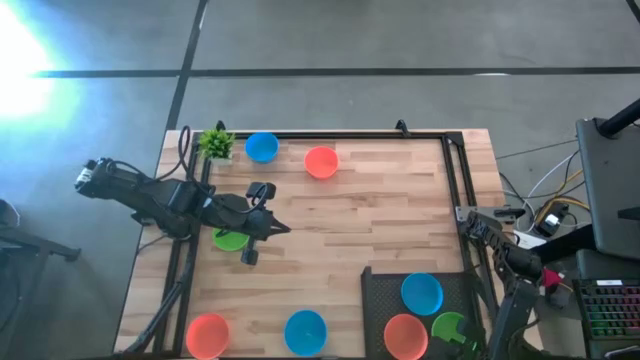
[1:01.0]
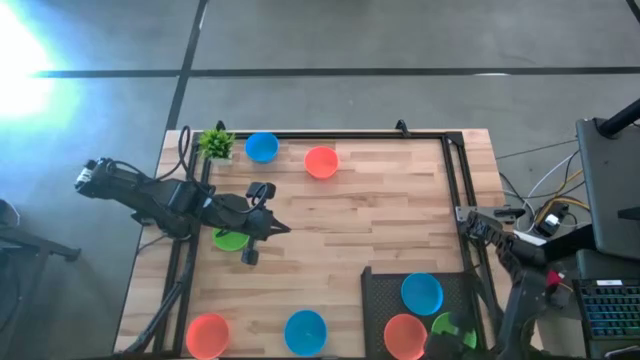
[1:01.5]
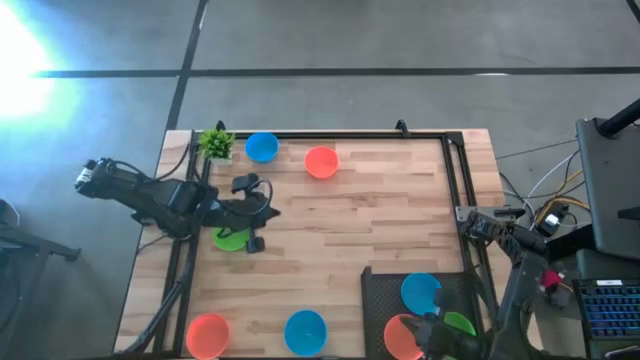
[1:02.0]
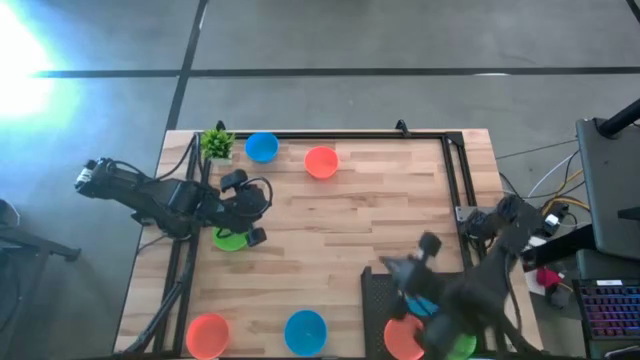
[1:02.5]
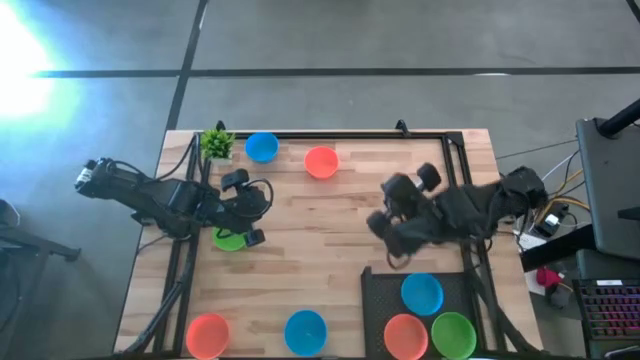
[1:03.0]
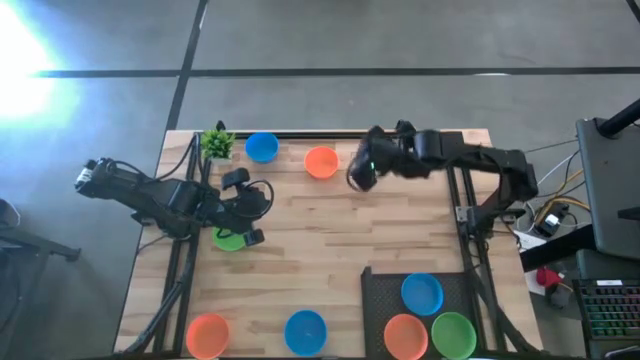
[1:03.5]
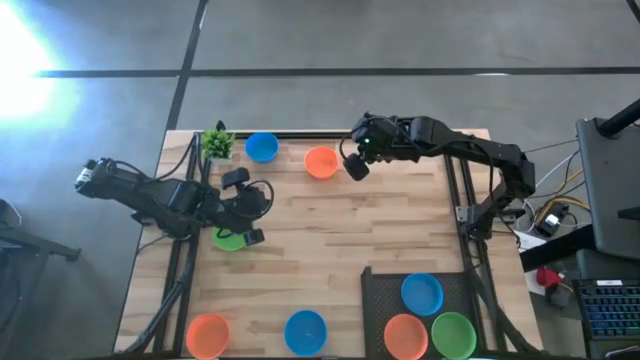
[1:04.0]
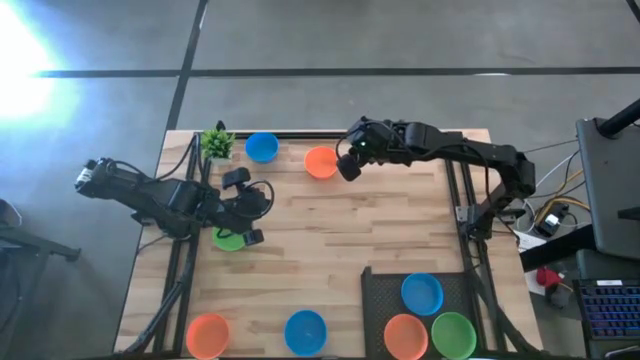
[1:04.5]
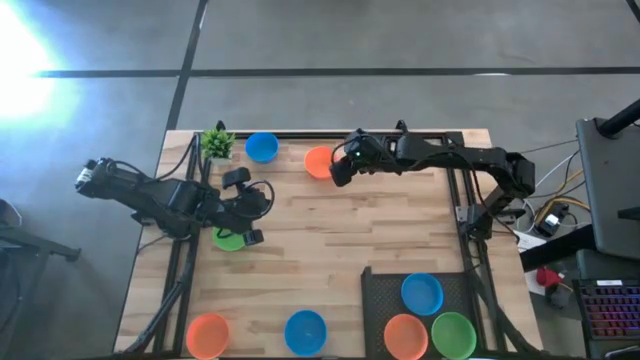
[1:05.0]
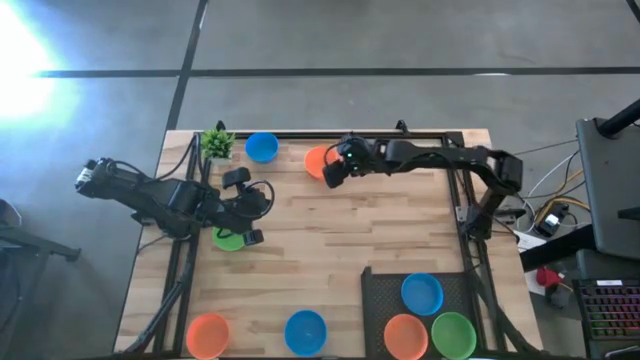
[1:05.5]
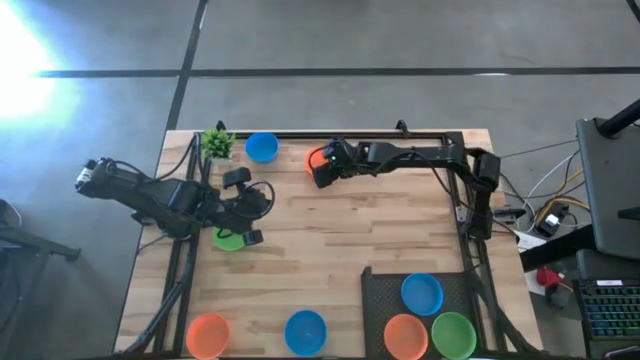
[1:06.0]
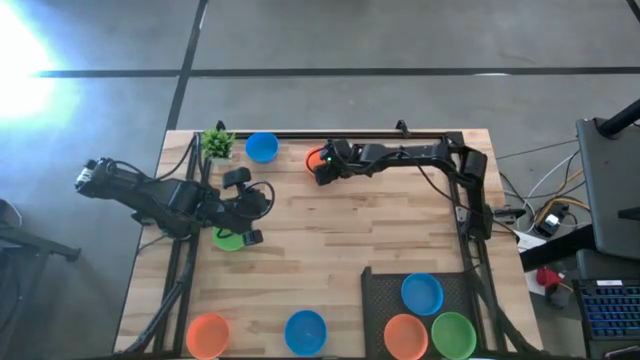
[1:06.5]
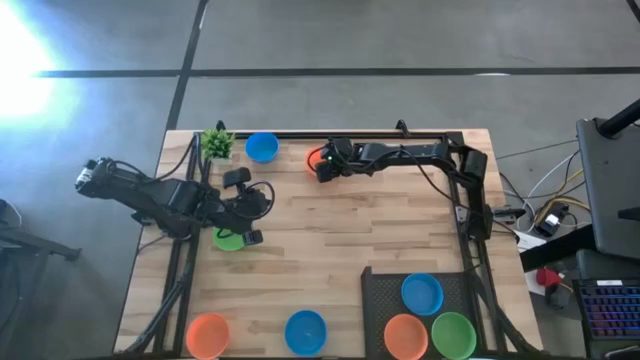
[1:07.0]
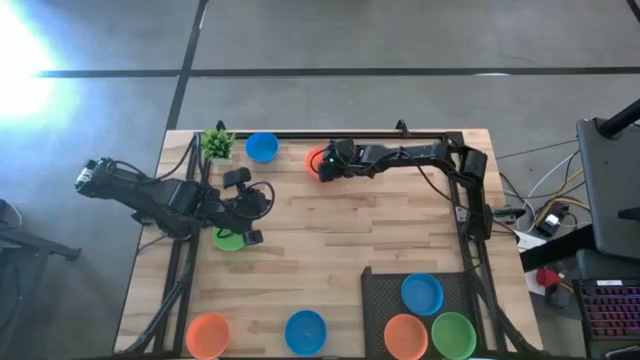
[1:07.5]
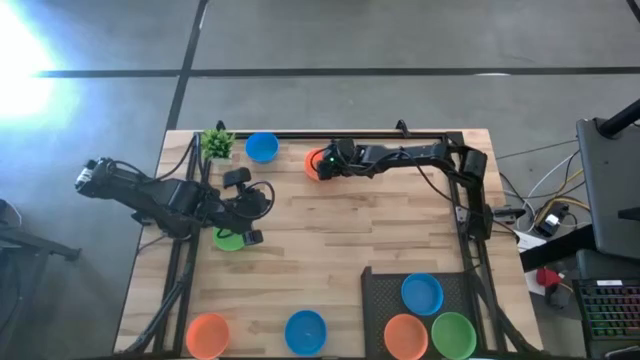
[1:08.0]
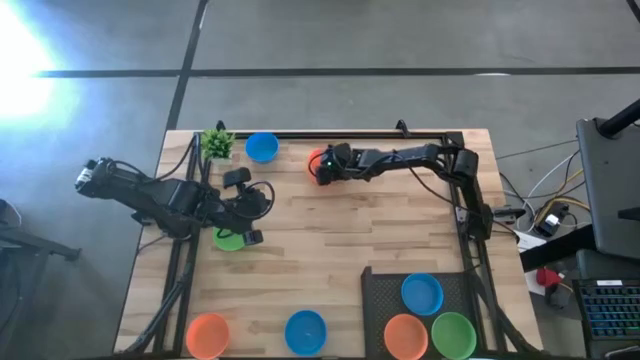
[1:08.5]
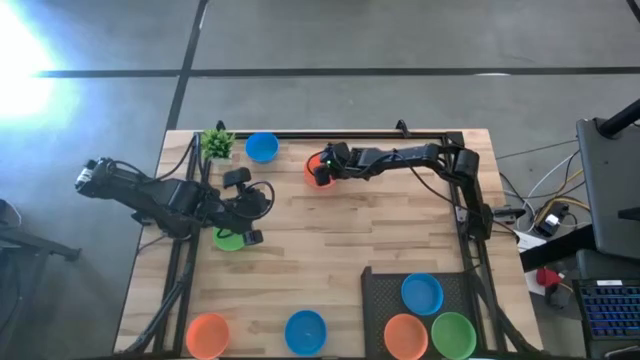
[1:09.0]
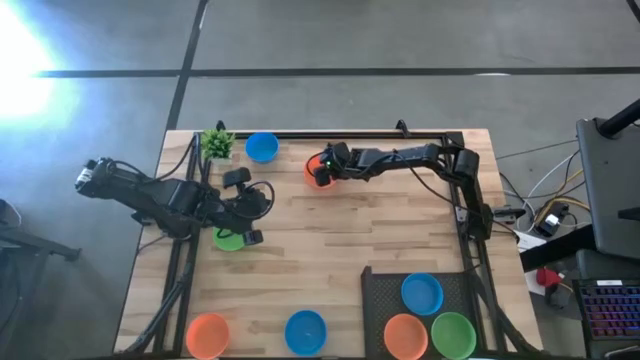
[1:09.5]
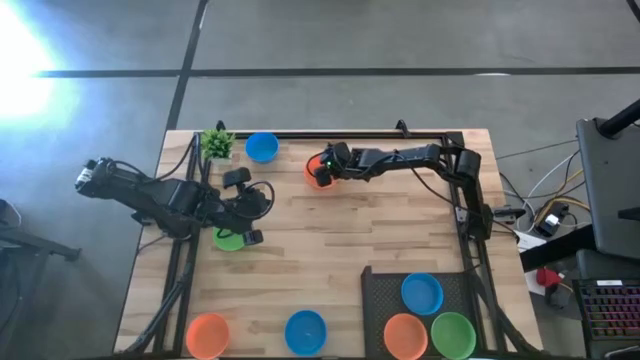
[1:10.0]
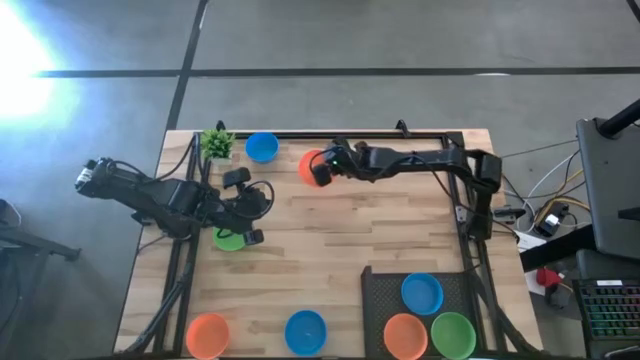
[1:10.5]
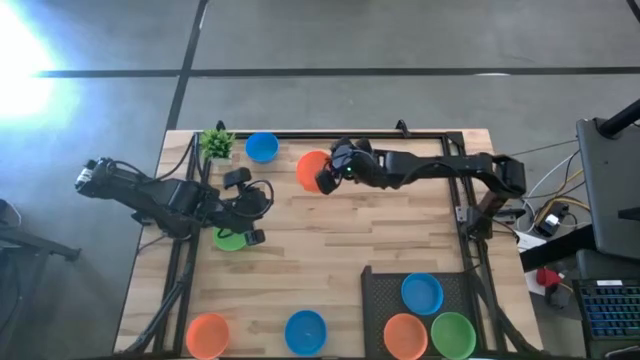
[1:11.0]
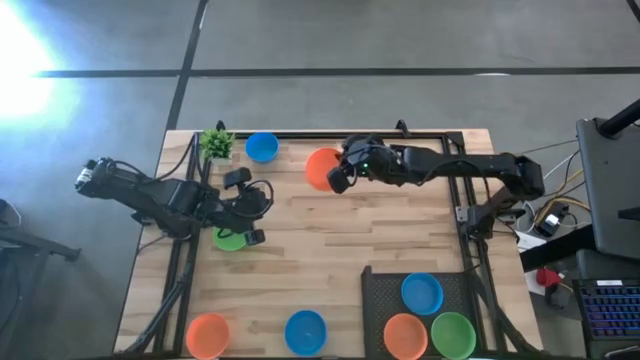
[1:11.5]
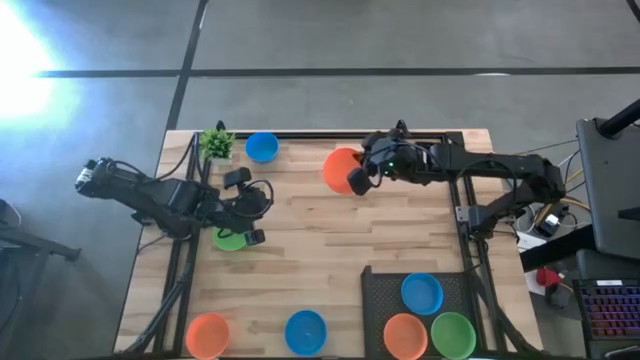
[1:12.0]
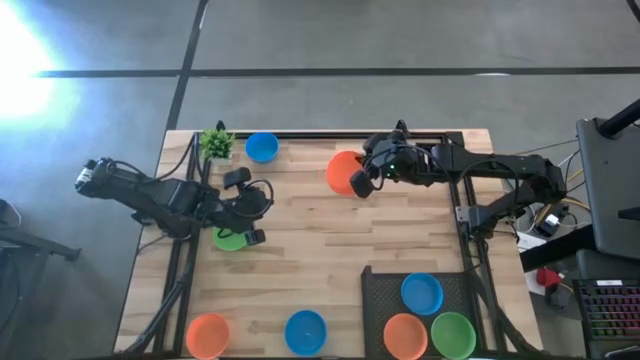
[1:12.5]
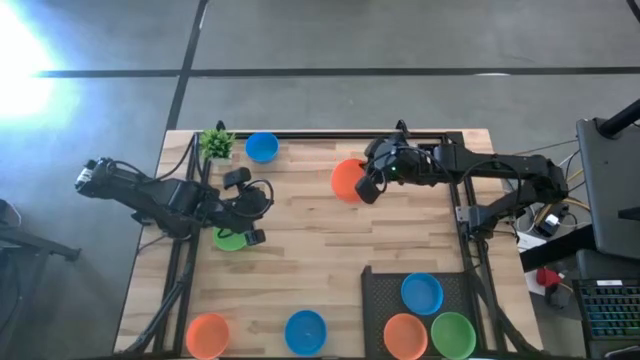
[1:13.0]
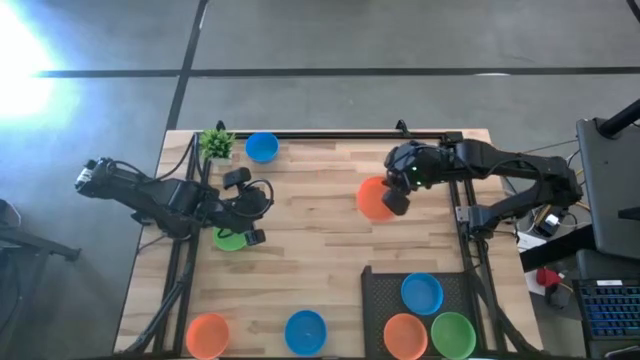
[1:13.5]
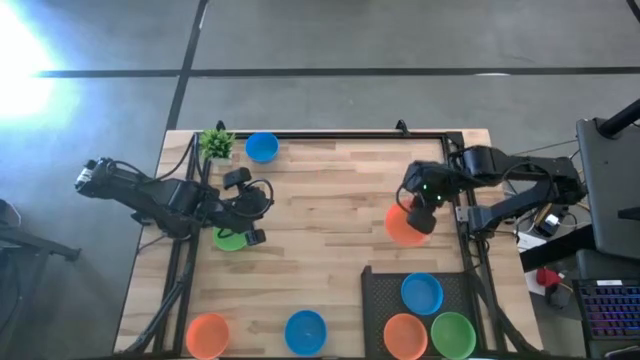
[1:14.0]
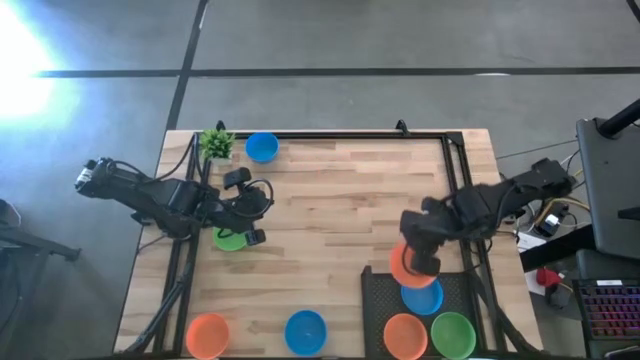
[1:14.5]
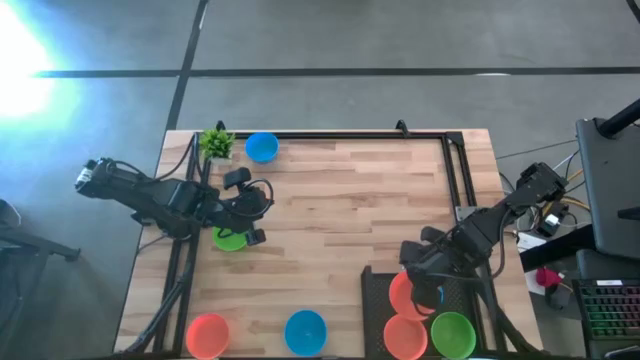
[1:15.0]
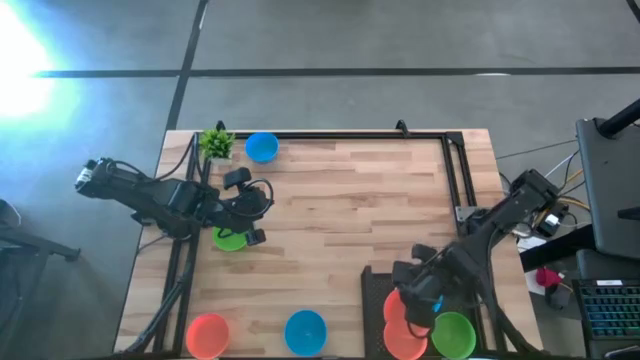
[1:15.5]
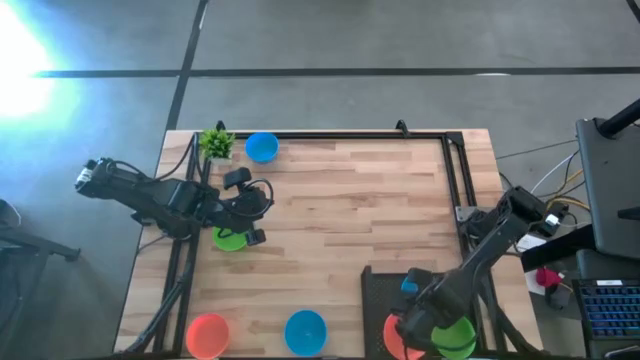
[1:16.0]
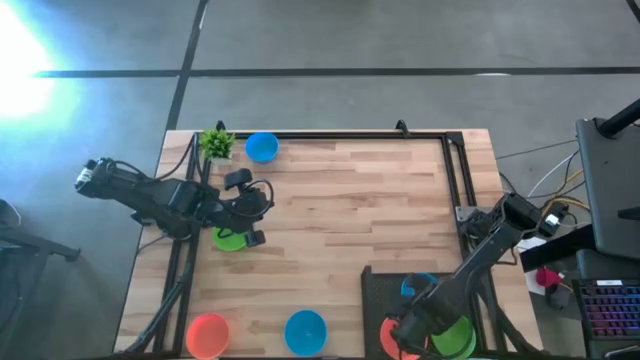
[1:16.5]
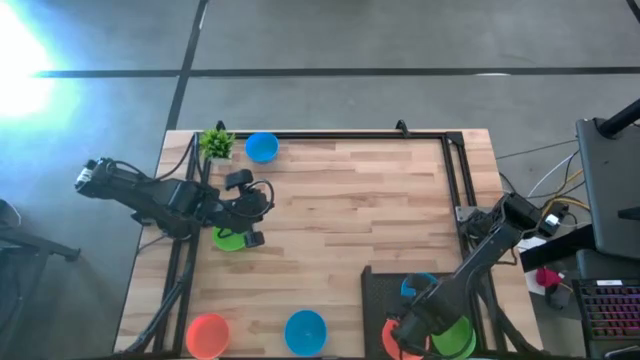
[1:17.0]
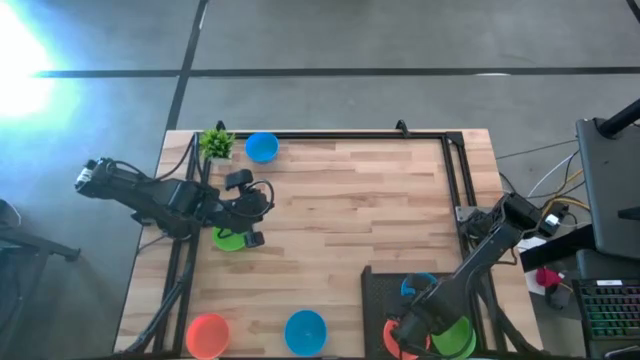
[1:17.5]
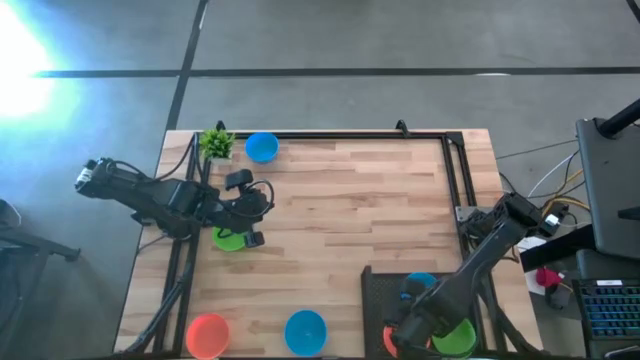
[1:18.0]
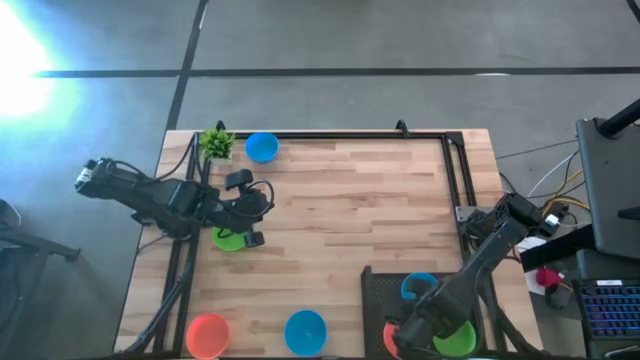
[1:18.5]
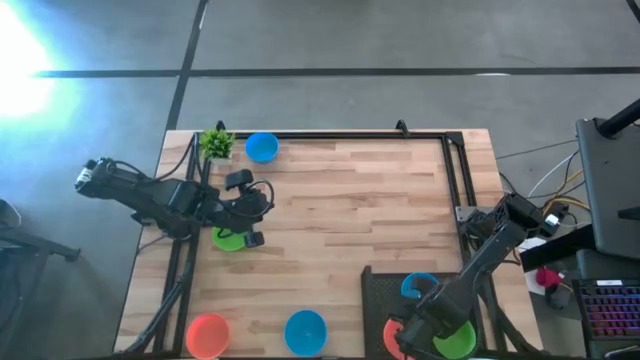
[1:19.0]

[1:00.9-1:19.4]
Task: Pick & Place Mini bowls
Stack the top orange bowl on the orange bowl on the shelf

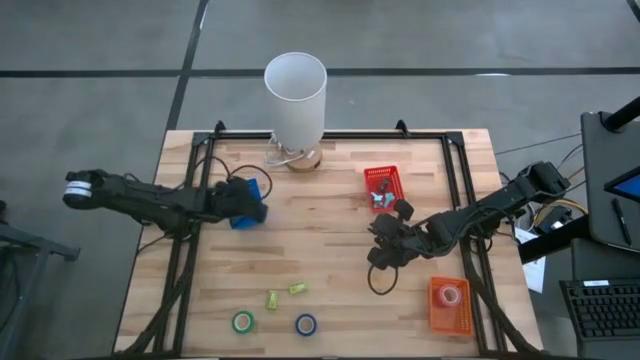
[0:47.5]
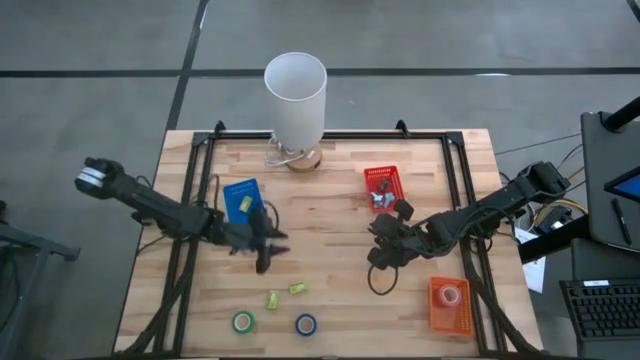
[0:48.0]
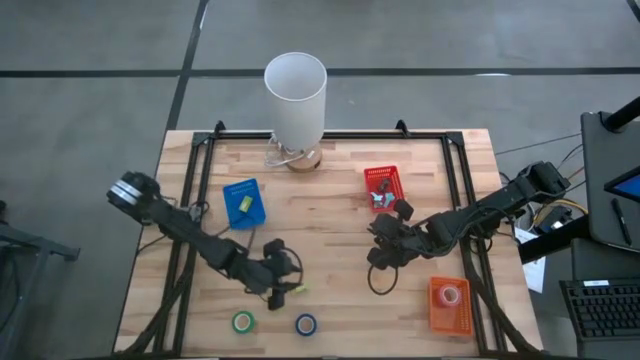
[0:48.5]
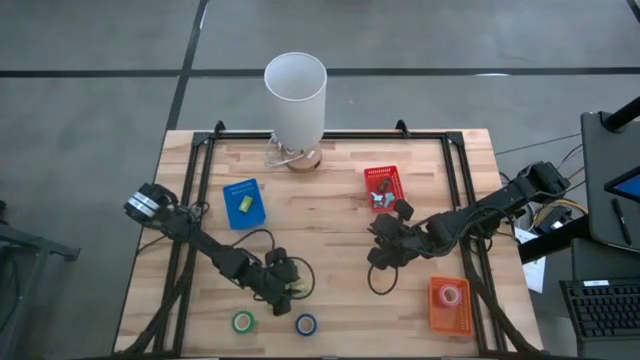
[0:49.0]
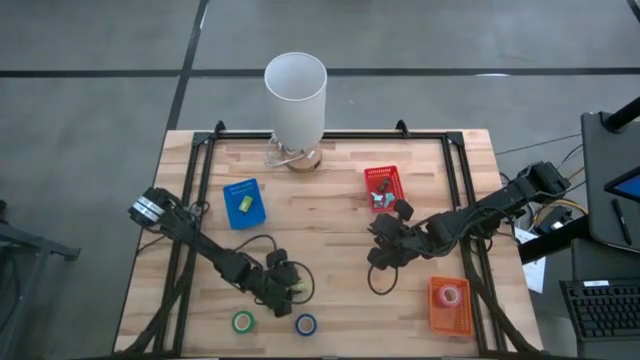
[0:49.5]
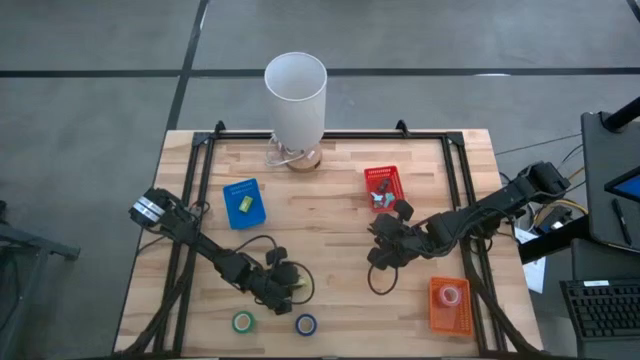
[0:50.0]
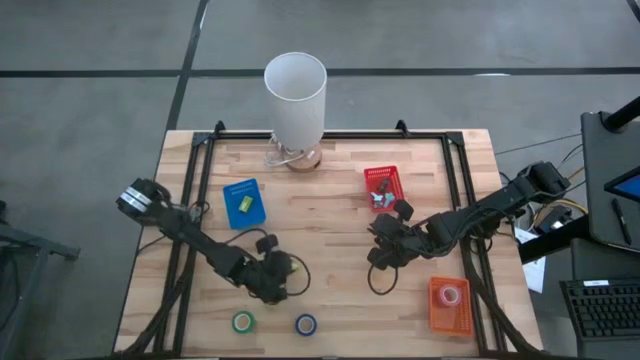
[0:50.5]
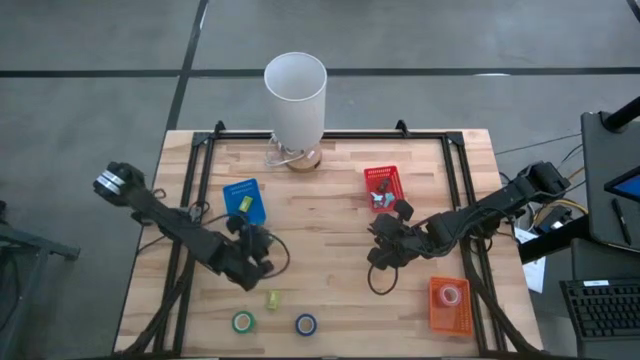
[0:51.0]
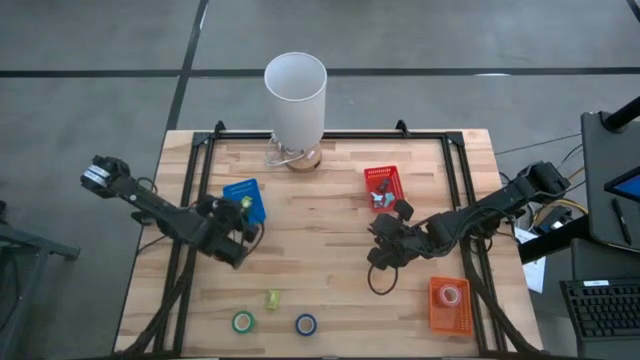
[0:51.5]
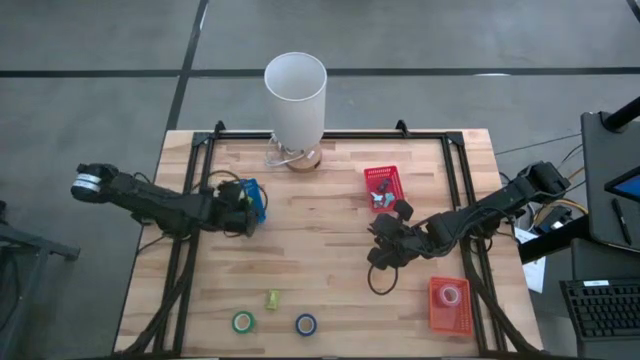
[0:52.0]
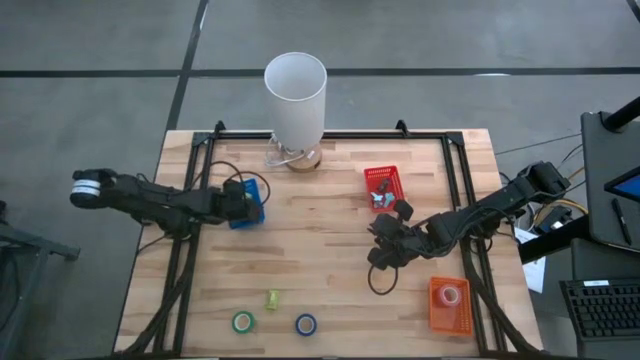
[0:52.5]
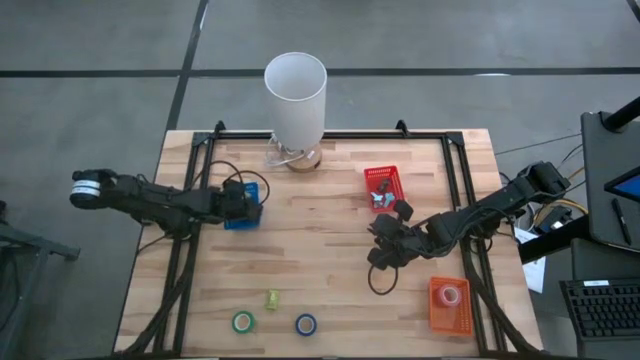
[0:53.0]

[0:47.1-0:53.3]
Task: Pick and place Stapler, Stapler remover, tape
Put the staple wire into the blue basket
